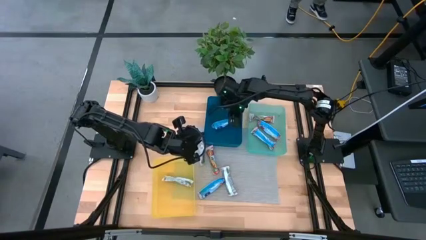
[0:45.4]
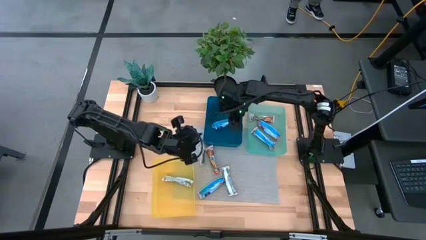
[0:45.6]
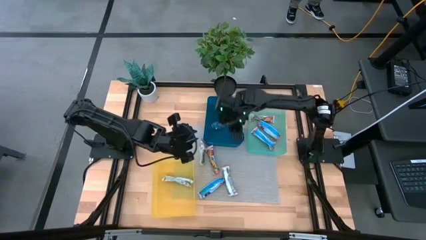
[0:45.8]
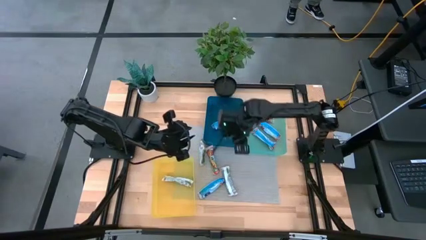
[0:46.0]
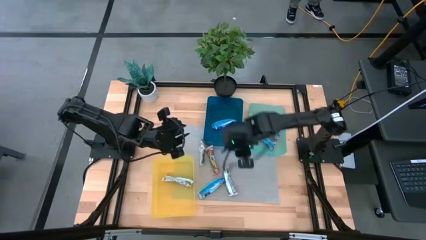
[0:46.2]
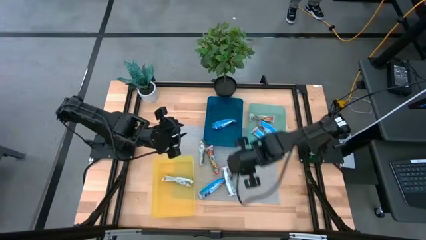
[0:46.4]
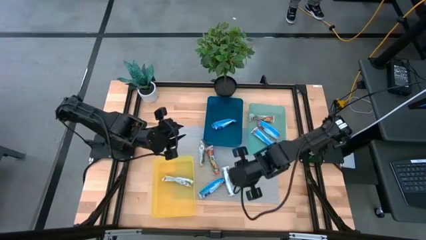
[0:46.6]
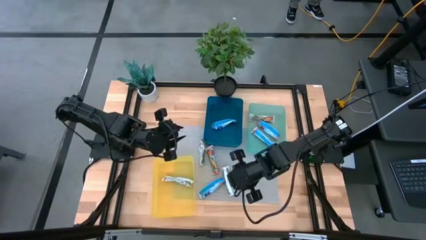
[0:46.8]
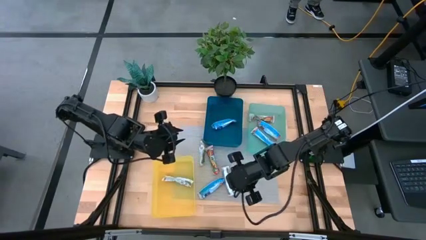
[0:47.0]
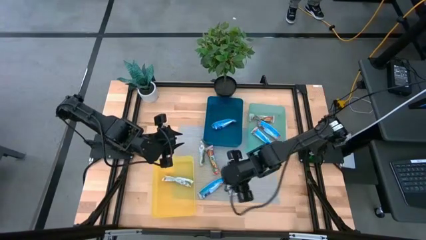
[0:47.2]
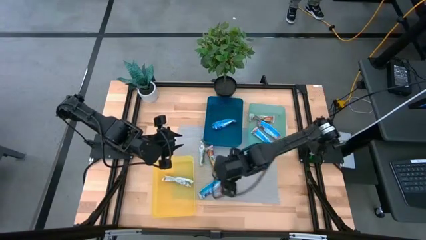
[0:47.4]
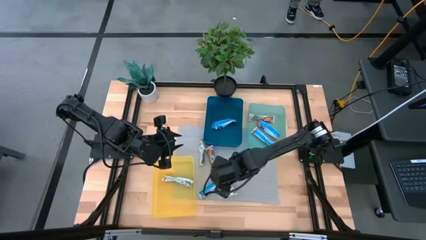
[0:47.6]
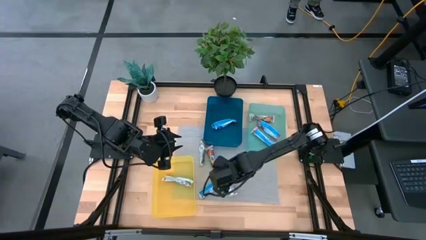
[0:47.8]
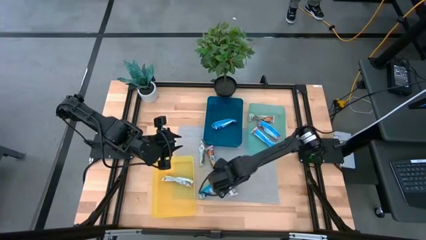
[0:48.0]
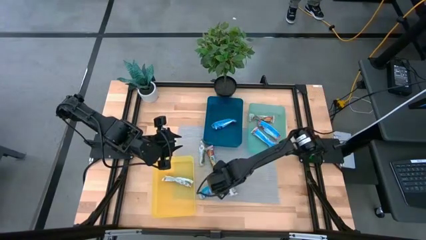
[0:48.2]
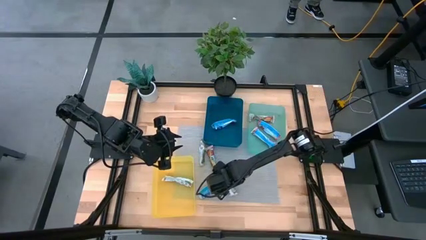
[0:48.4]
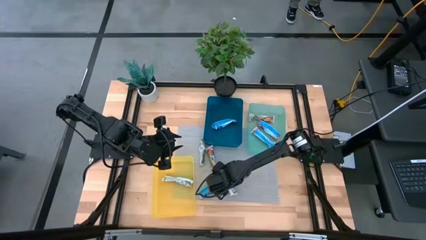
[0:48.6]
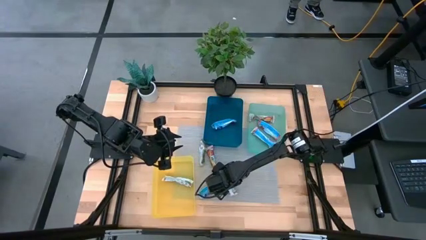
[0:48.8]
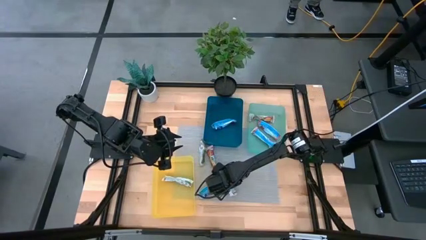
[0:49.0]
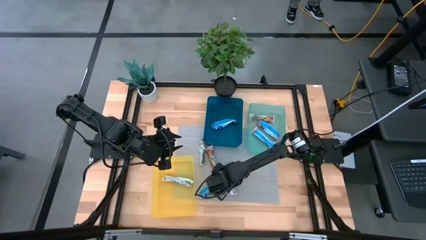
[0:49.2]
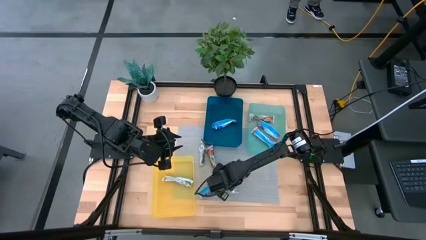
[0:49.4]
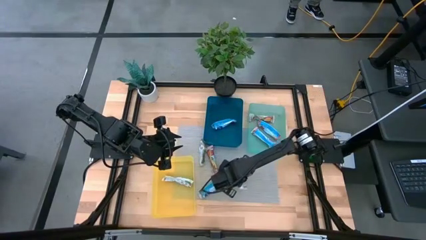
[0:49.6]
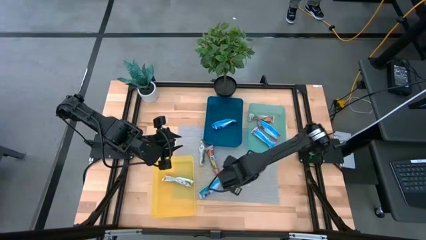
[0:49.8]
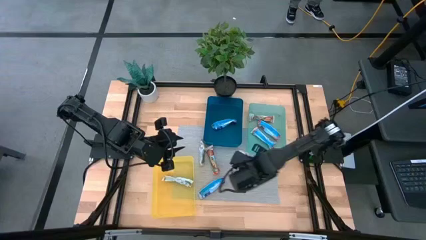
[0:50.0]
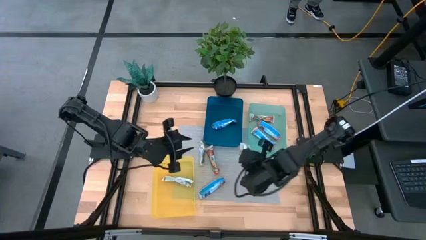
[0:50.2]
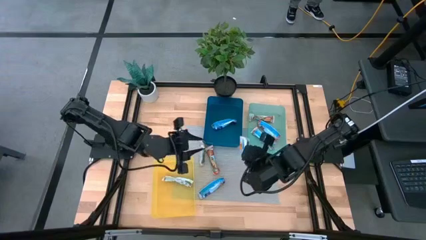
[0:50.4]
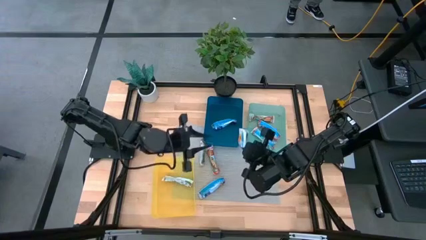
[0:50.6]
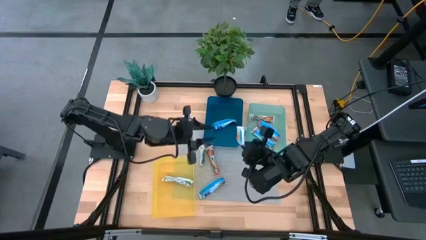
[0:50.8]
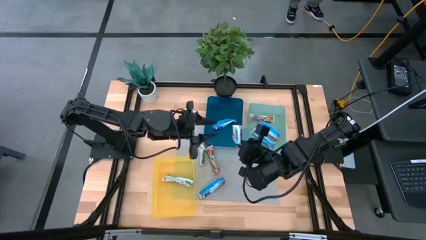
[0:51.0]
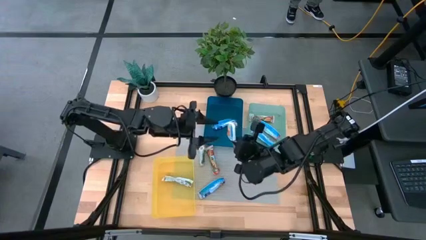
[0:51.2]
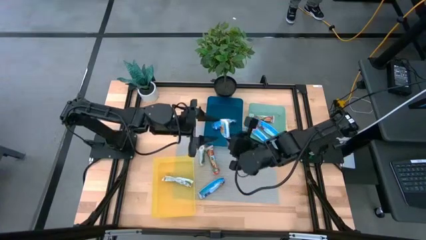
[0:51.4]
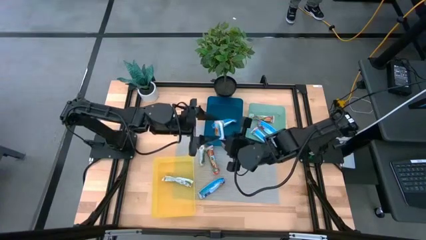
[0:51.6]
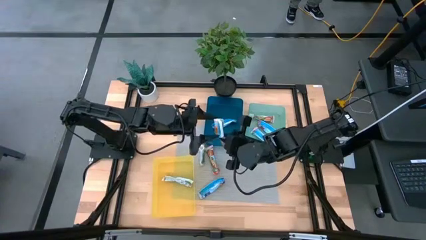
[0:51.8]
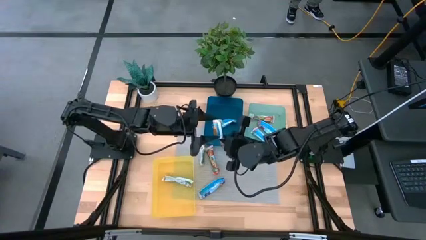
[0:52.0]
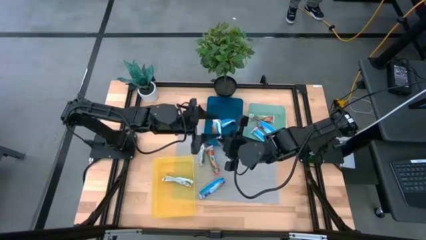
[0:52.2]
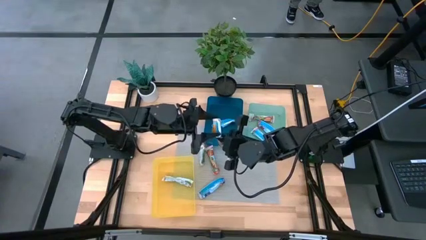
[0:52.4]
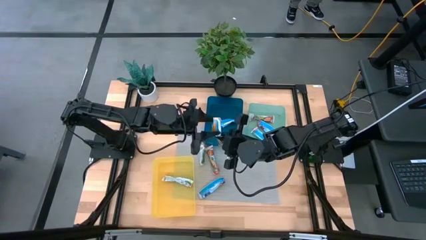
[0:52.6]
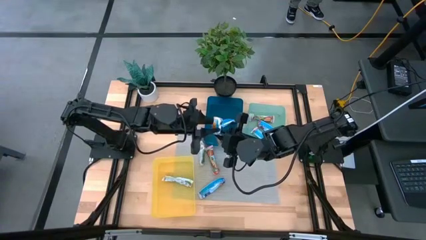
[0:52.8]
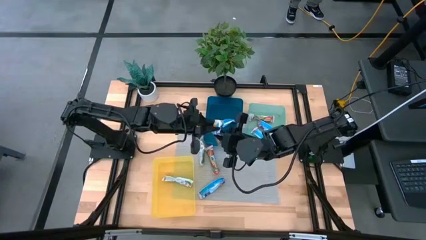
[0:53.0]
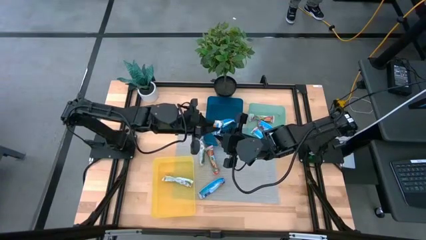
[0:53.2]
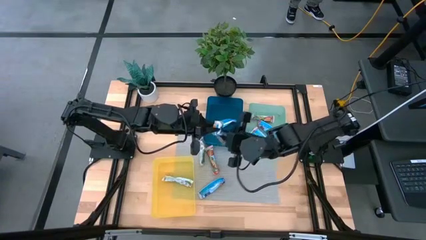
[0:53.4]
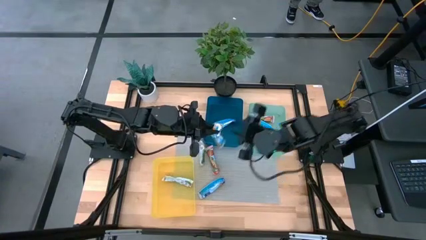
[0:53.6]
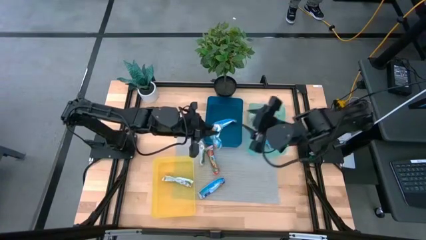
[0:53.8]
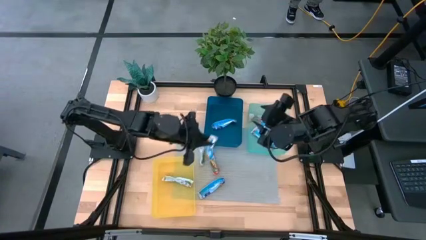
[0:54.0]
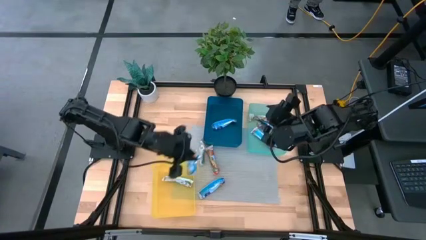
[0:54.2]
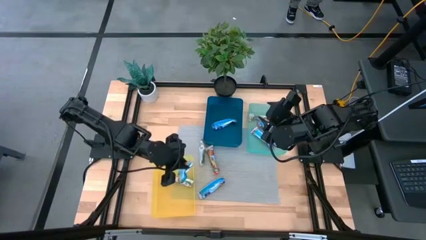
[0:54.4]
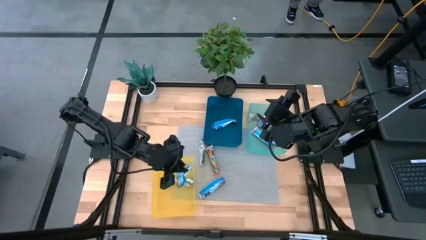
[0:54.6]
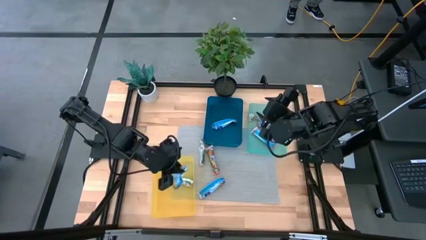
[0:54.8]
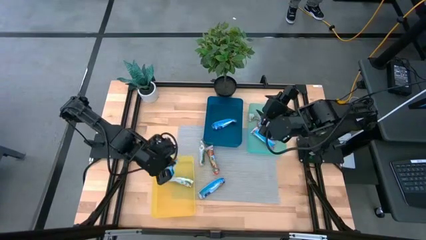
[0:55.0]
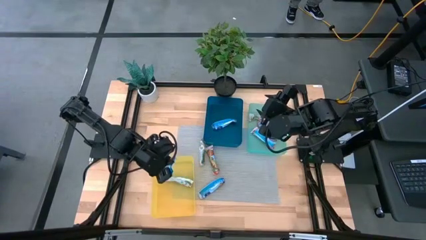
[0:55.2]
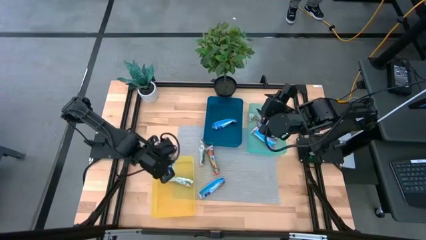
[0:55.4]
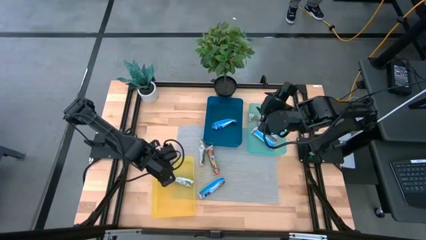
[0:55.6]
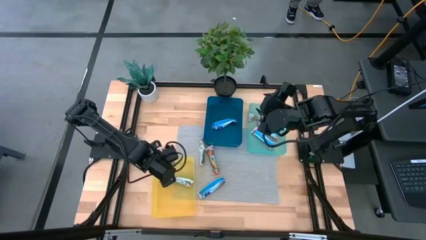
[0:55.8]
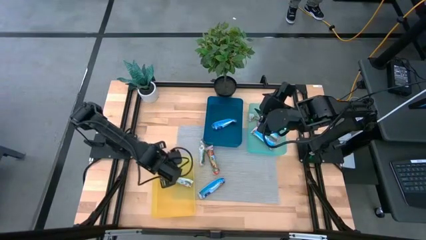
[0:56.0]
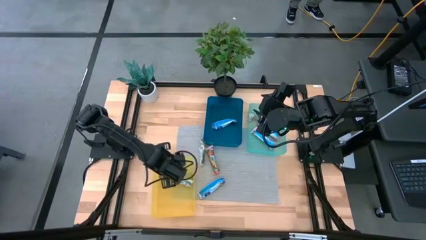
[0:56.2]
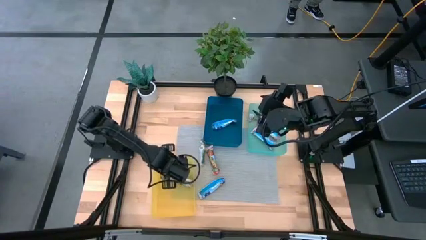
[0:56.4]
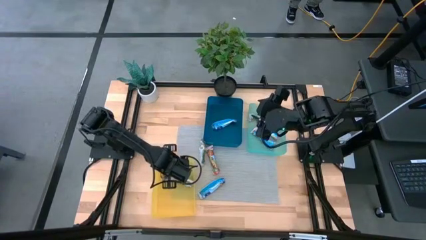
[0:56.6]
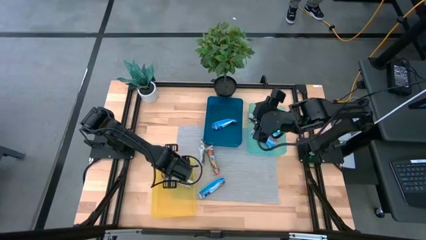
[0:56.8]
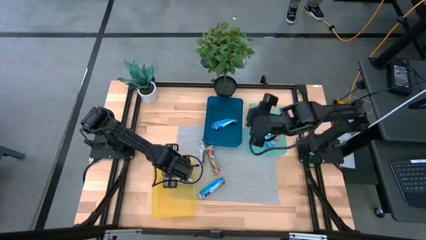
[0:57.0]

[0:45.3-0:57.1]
Task: Pick and place Granola Bars by type
Put the yellow granola bar into the yellow bin

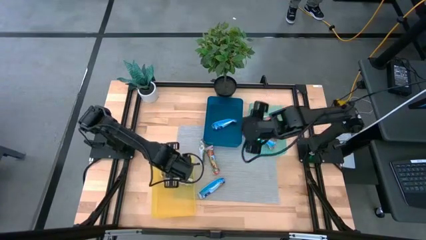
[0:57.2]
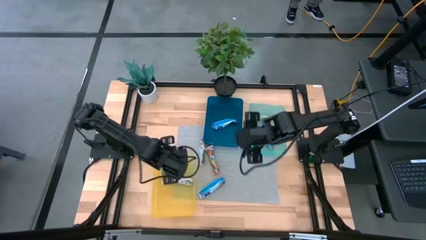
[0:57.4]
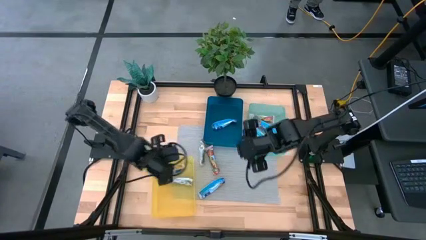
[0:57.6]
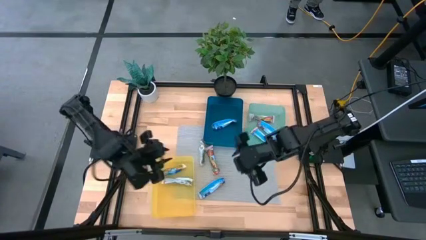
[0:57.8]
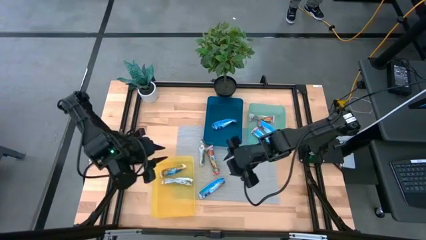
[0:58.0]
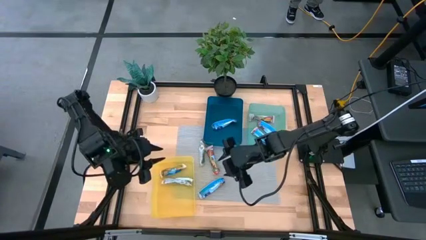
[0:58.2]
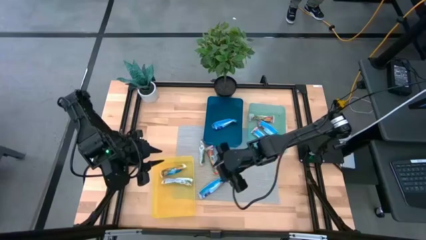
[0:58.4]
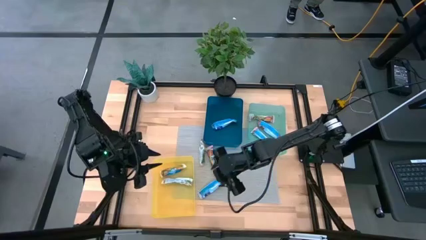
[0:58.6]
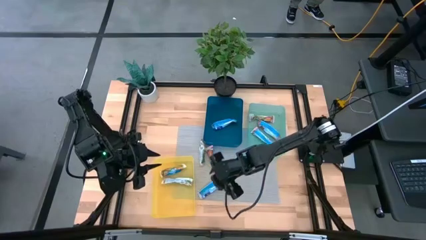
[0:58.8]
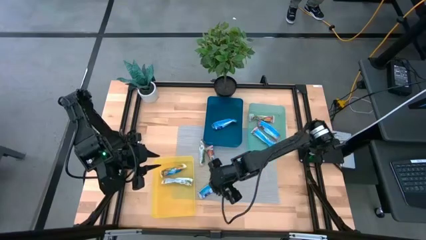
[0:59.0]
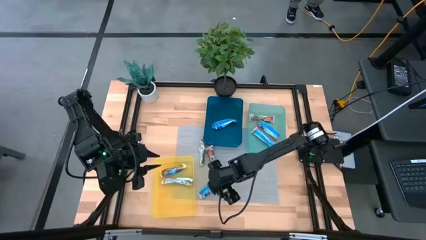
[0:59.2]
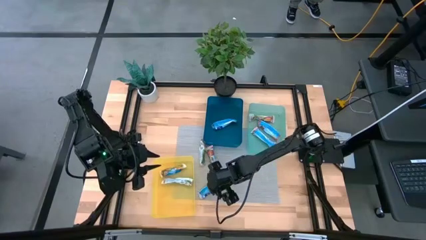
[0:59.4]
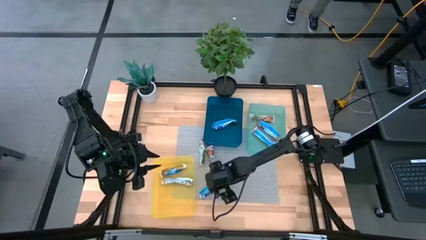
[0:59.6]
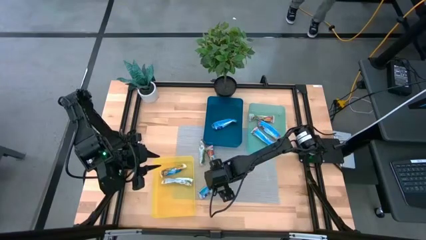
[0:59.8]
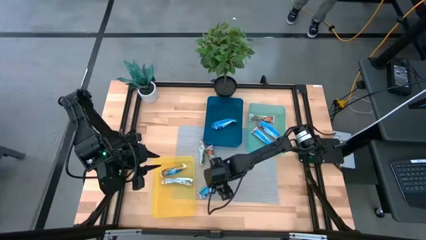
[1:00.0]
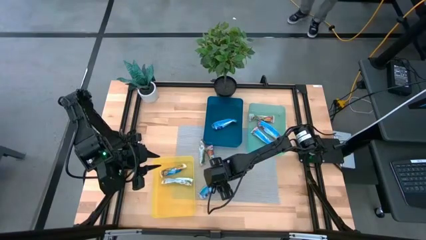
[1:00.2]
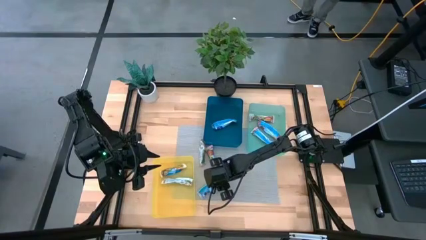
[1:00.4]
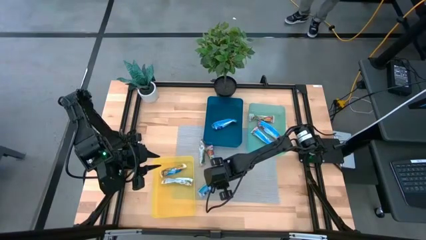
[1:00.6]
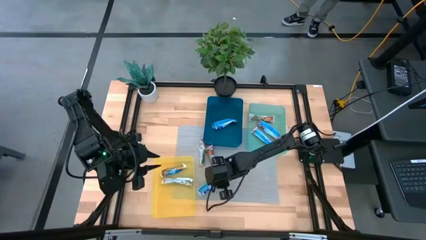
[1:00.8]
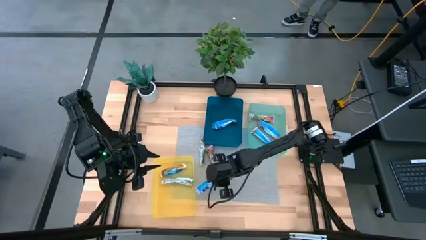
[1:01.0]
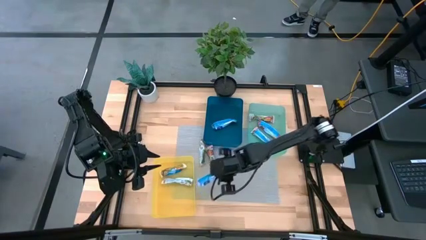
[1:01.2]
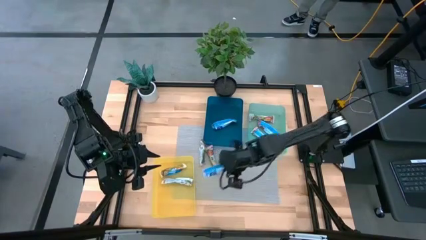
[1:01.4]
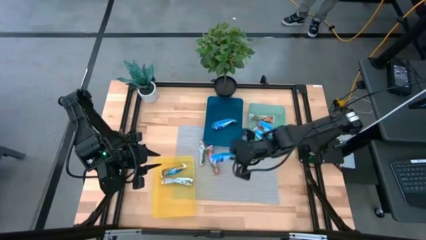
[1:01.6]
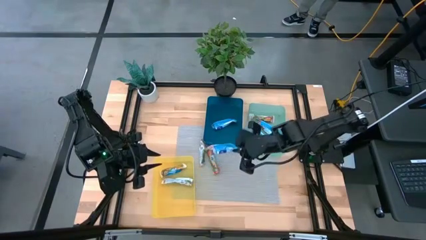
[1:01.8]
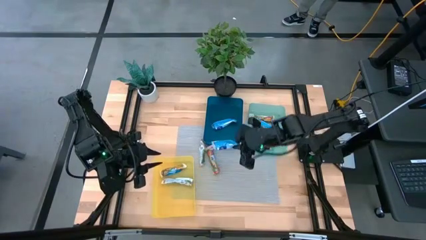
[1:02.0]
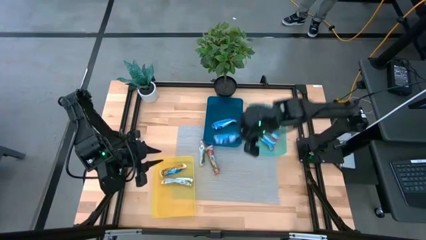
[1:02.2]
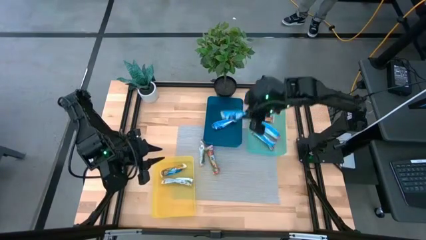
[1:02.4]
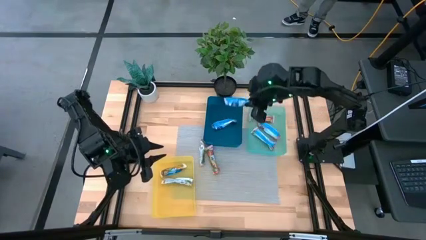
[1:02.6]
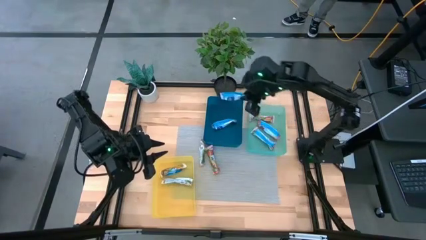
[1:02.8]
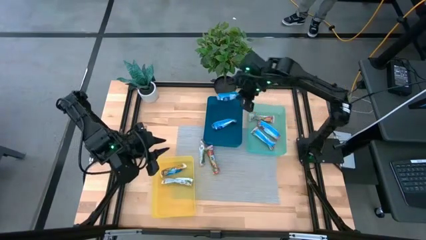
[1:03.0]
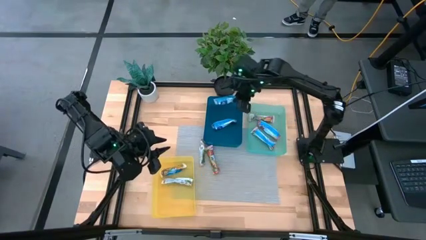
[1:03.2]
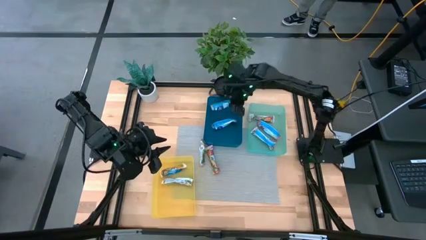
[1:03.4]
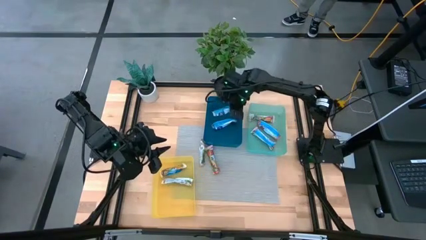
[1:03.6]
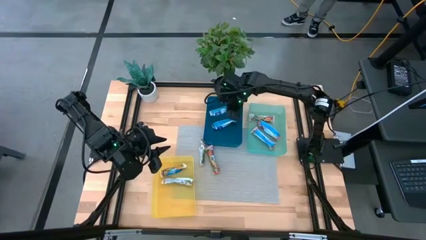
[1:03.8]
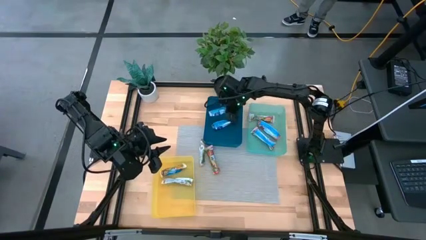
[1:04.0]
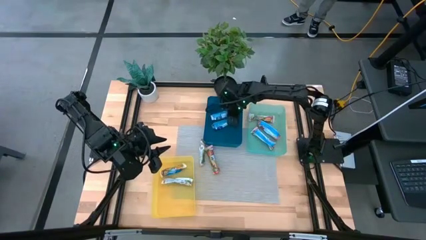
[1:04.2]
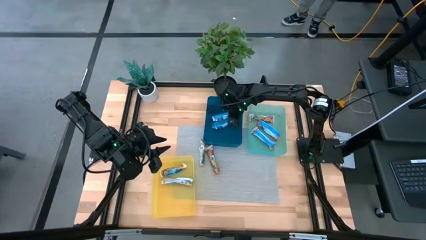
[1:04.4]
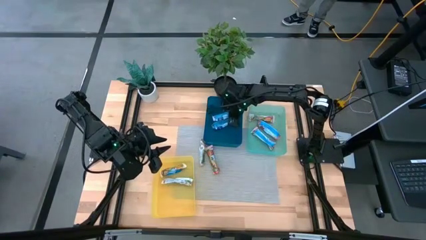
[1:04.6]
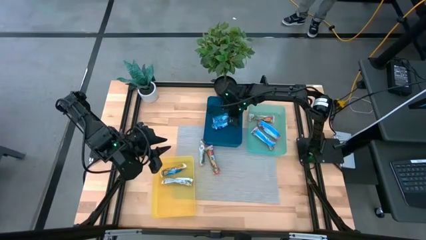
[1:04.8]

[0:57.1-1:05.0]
Put the blue granola bar into the blue bin
